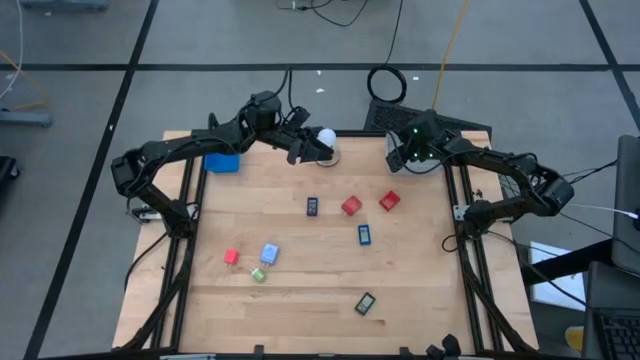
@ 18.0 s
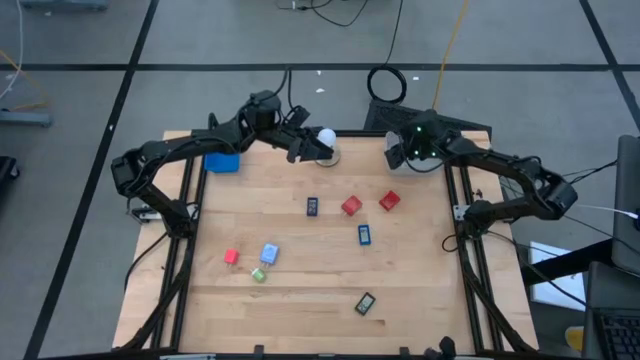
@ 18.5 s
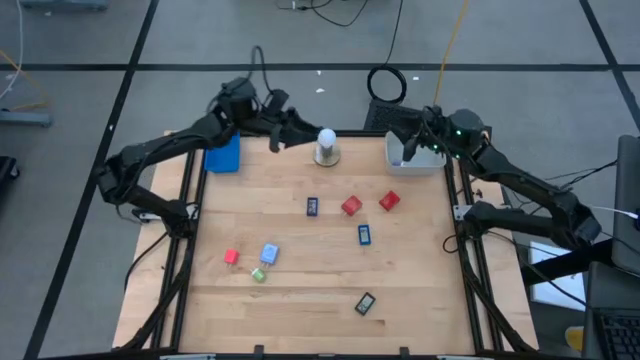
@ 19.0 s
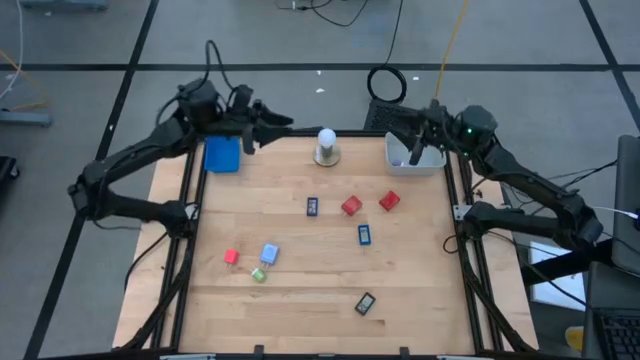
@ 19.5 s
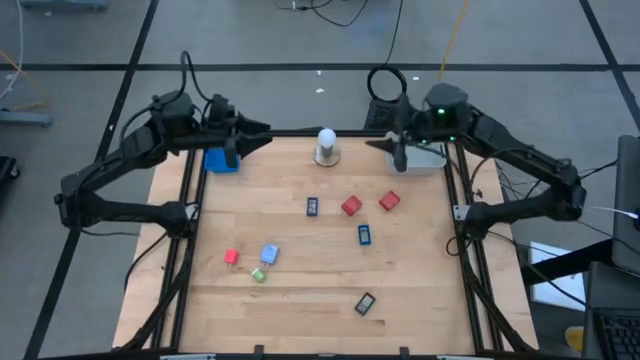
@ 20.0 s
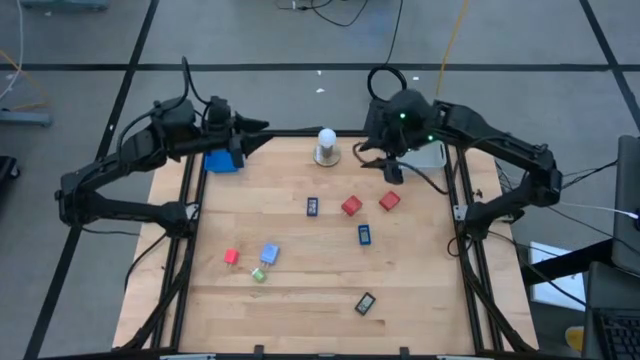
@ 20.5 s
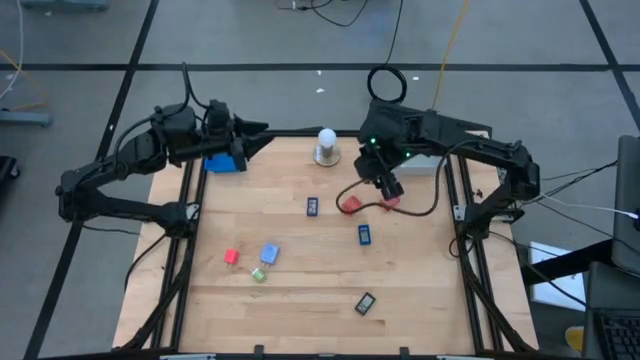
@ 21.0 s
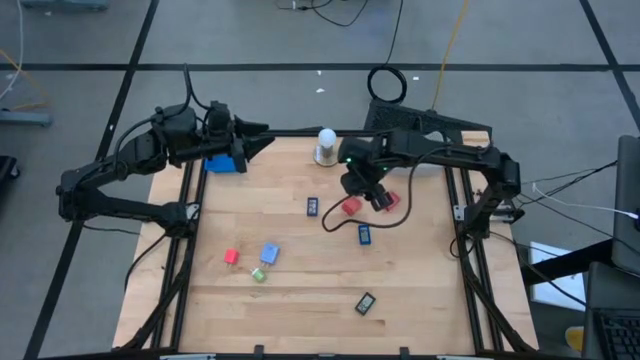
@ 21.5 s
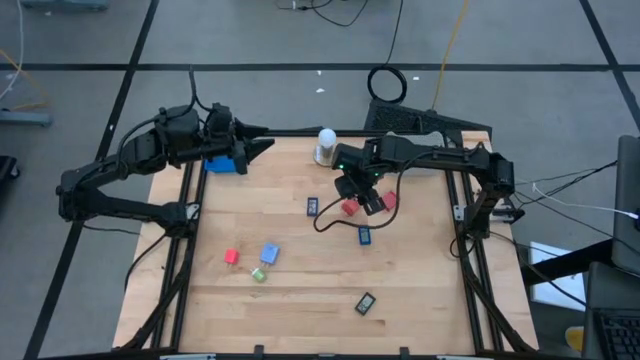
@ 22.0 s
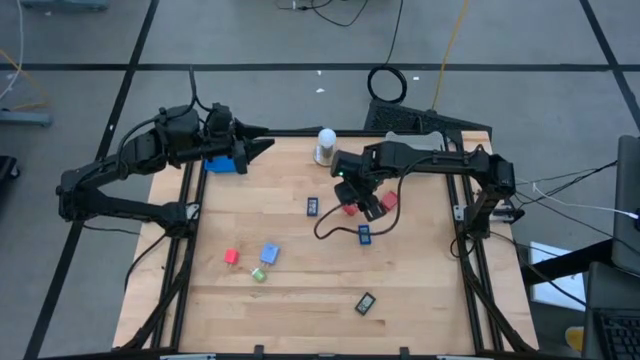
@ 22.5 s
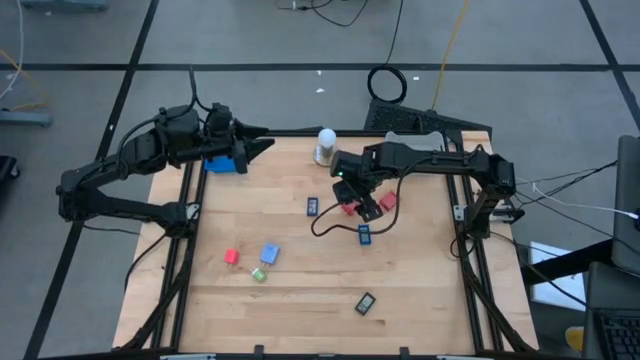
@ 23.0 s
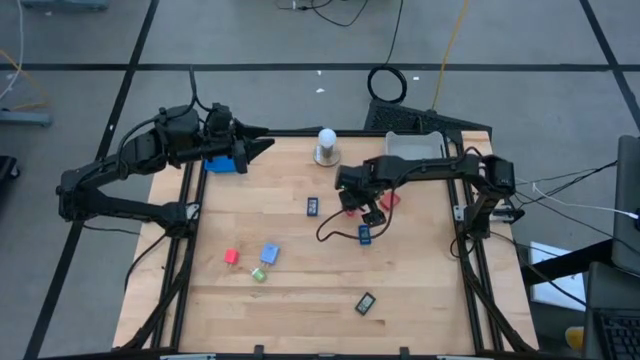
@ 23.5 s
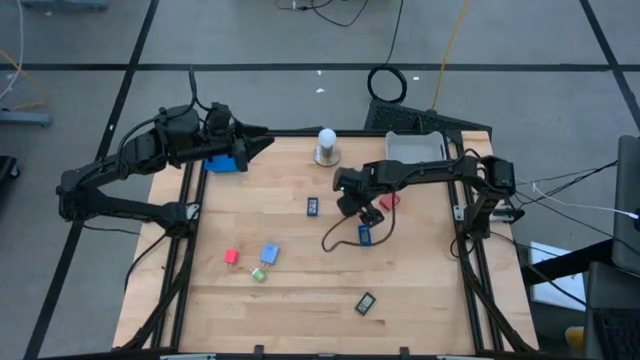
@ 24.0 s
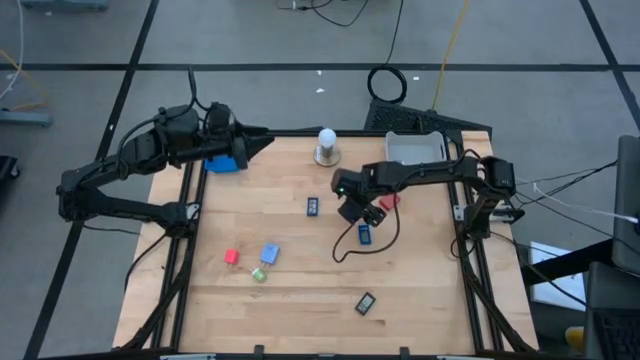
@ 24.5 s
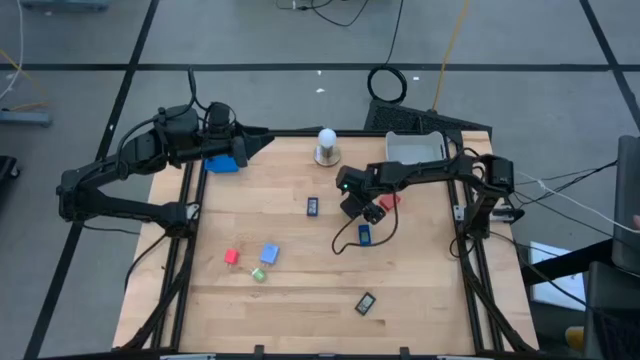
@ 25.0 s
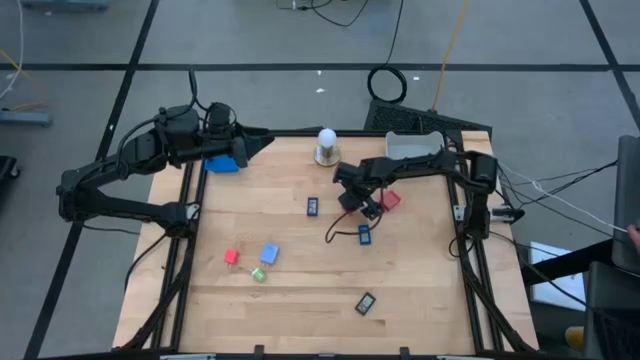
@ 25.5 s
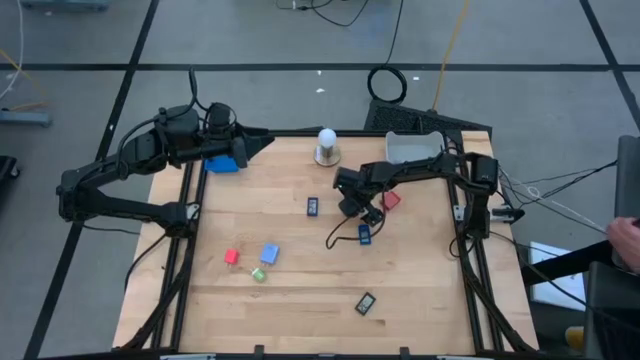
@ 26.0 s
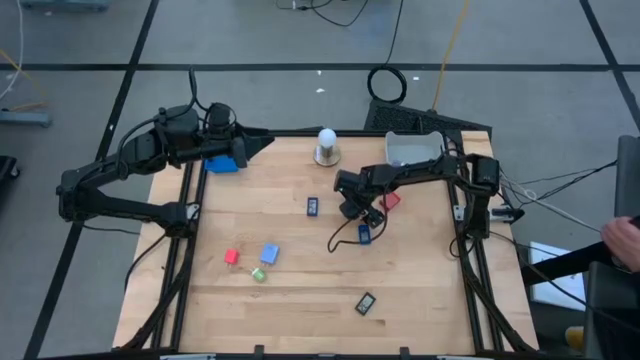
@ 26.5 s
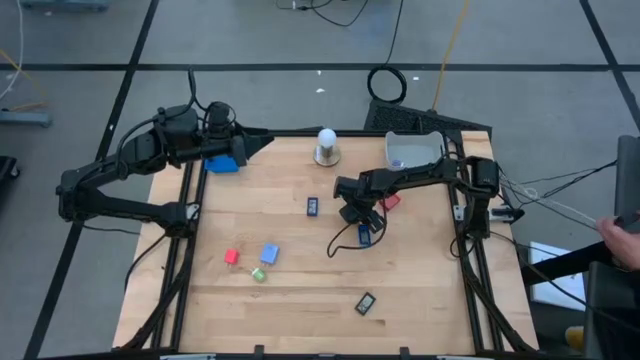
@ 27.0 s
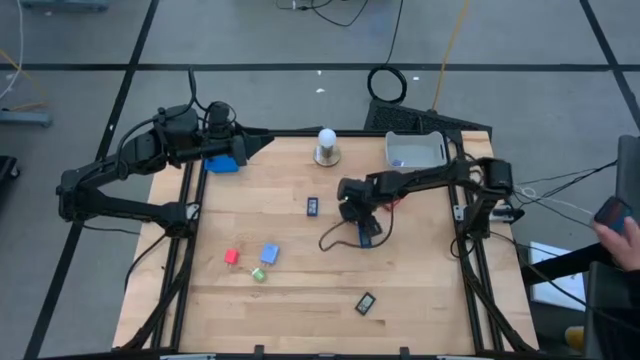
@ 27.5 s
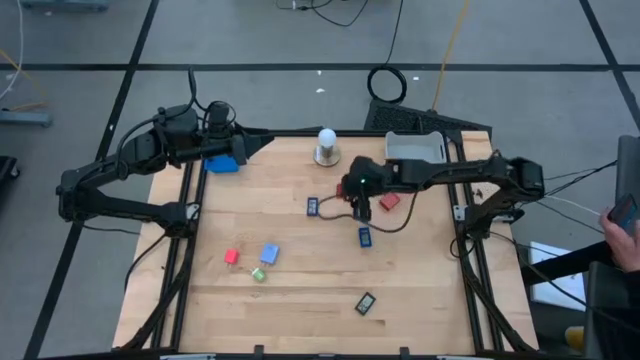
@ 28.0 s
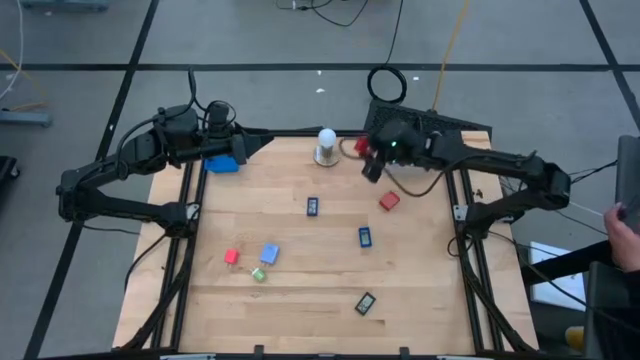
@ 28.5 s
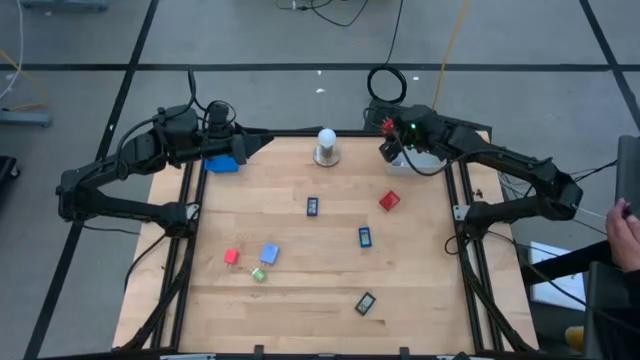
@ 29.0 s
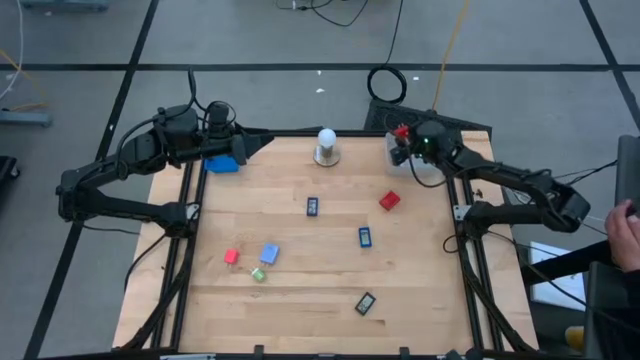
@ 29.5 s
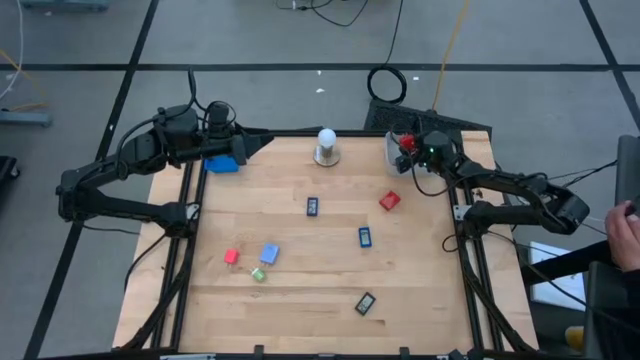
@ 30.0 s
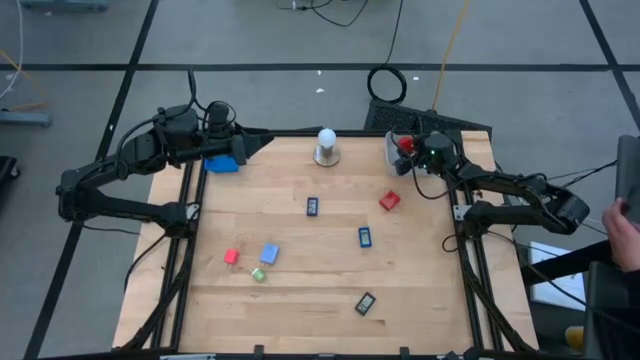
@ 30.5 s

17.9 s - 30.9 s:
Task: Pick & Place Office items
Put the left red charger adapter into the gray bin

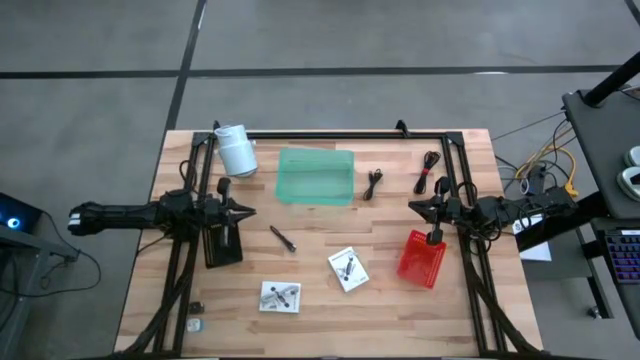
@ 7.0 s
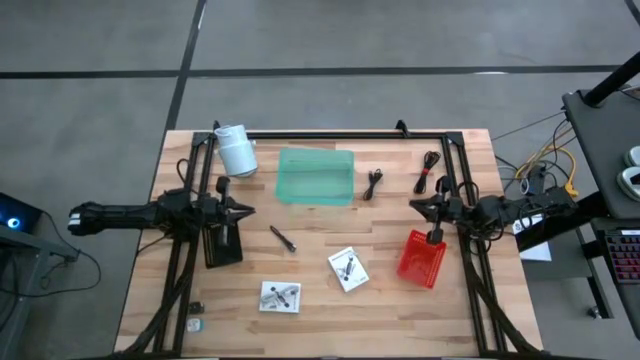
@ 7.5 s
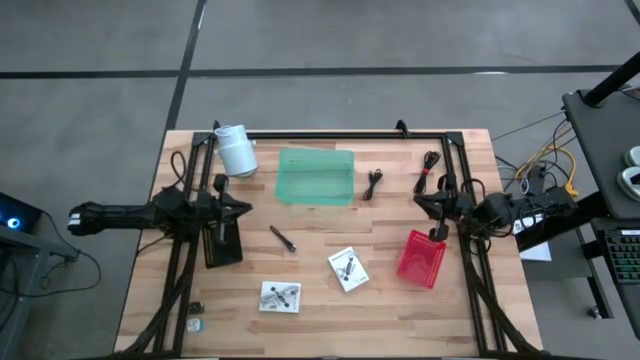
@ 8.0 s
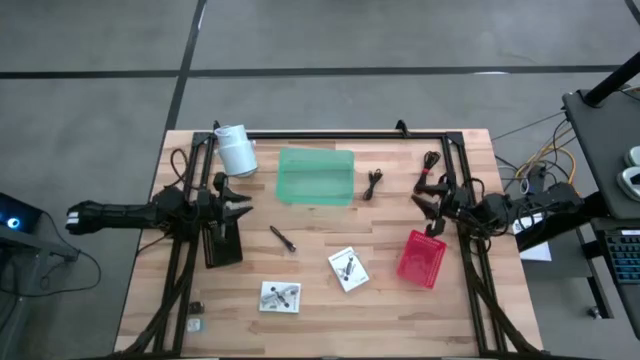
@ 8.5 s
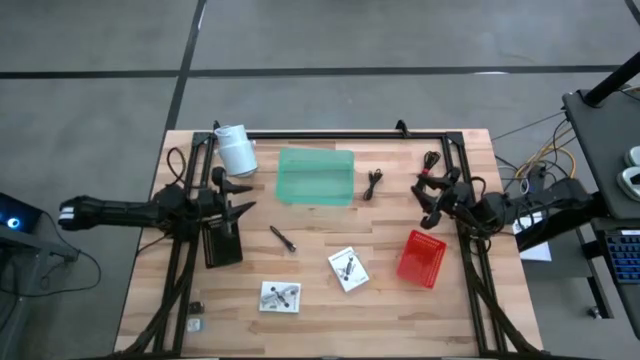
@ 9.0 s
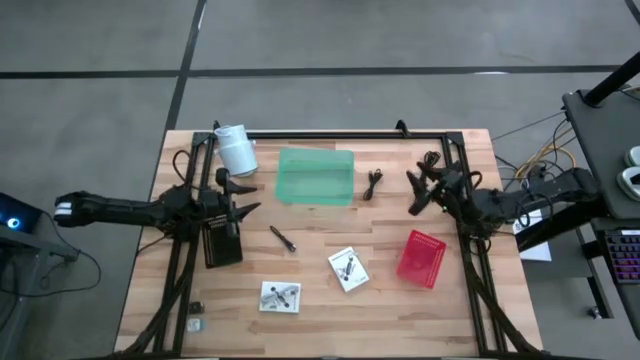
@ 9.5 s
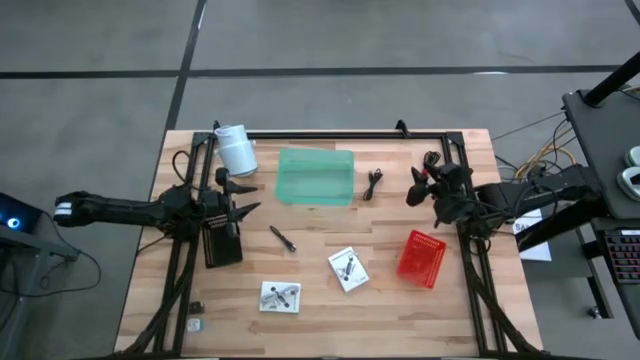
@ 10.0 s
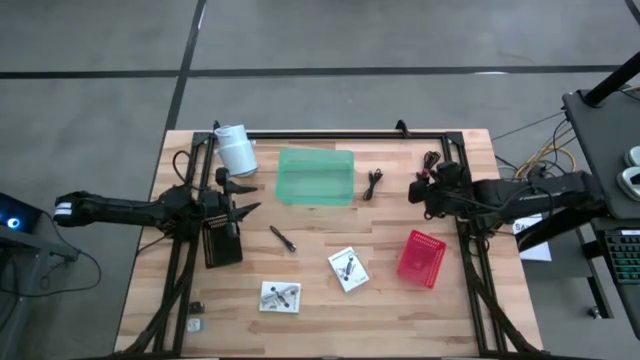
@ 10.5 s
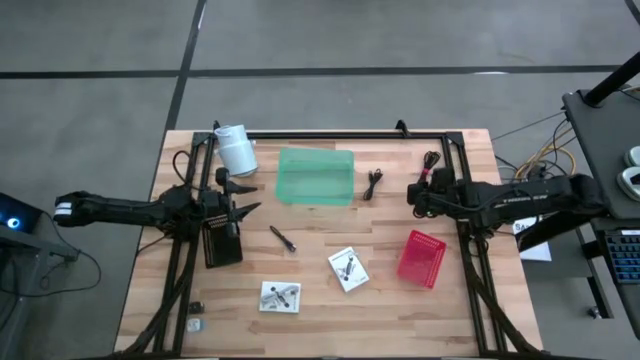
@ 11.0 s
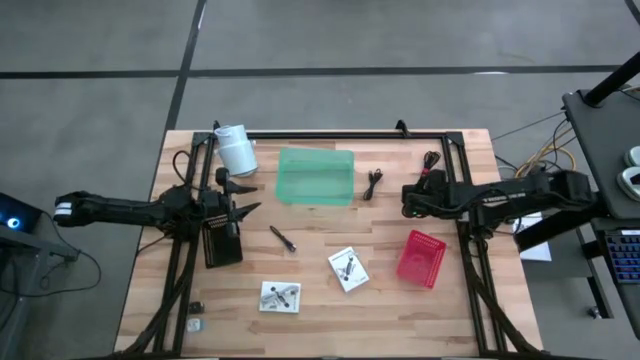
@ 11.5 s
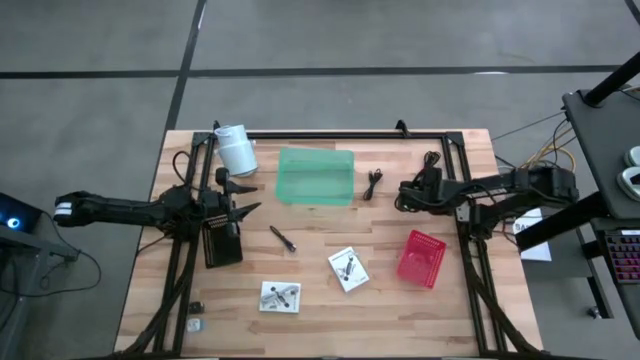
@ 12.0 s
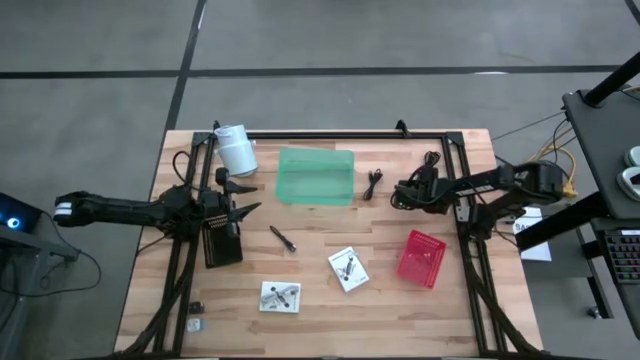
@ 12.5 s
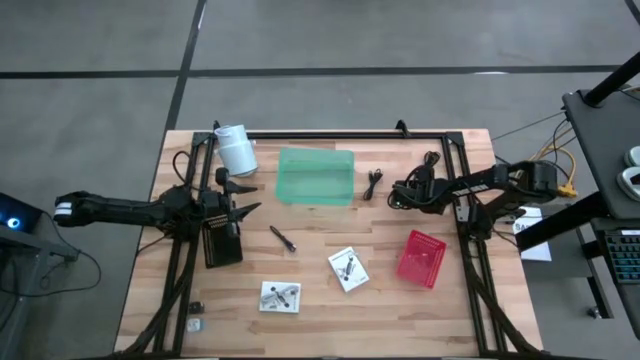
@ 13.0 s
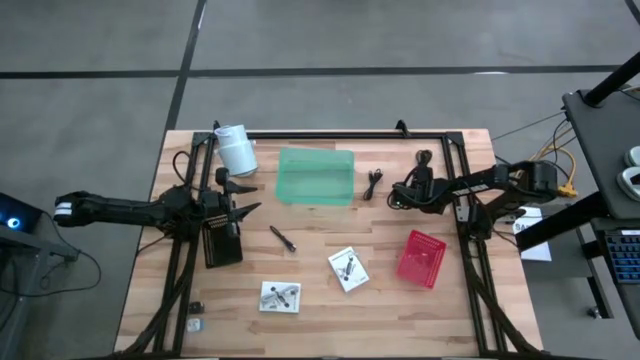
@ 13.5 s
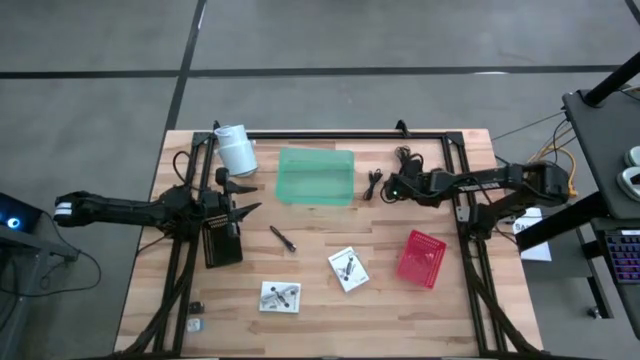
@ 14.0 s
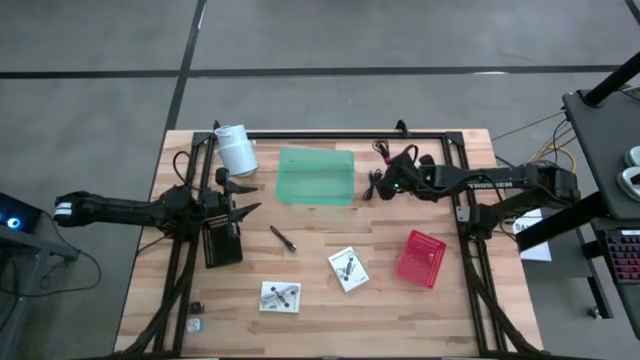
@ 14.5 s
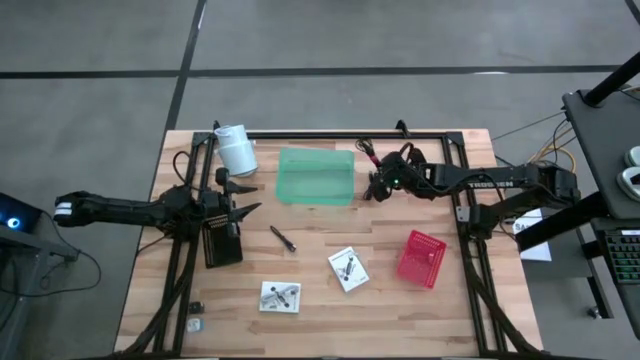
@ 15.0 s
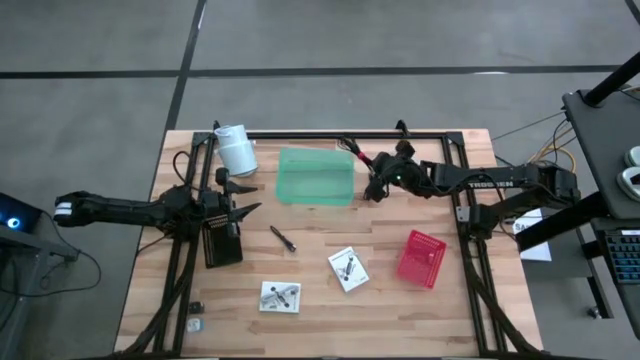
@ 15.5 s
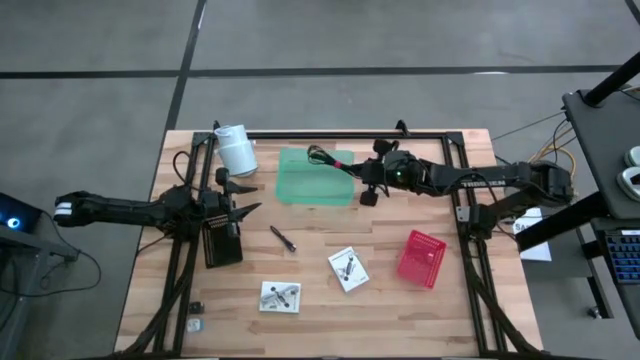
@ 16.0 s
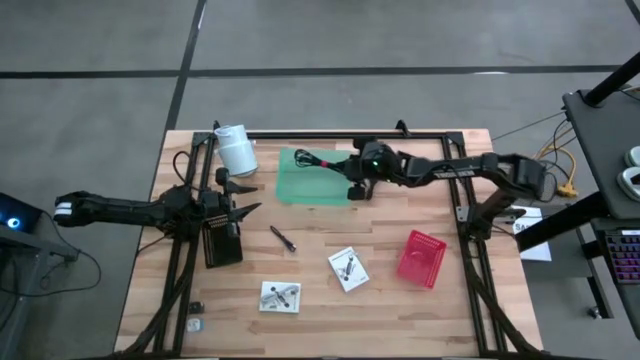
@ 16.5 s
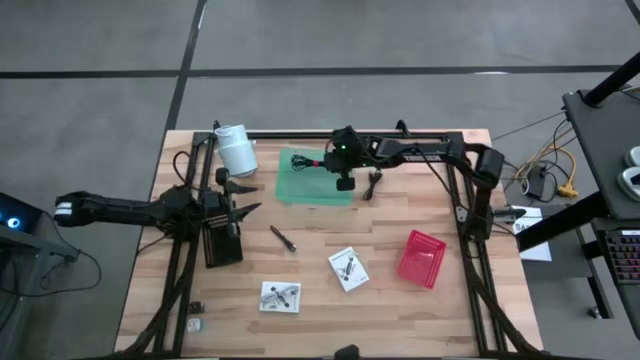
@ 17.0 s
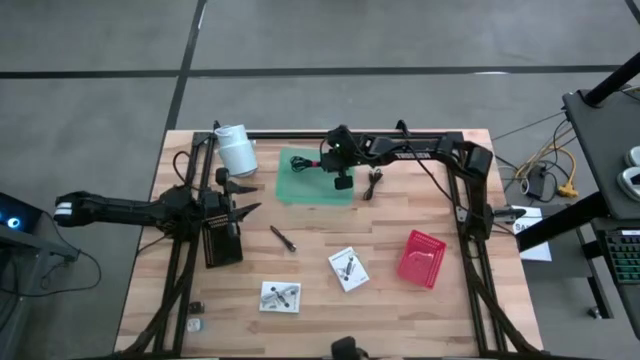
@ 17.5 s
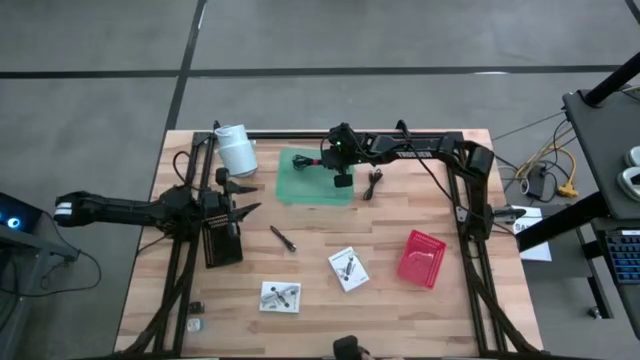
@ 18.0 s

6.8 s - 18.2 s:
Task: Pick and place items into bin
Put the top right black charger cable into the green bin
